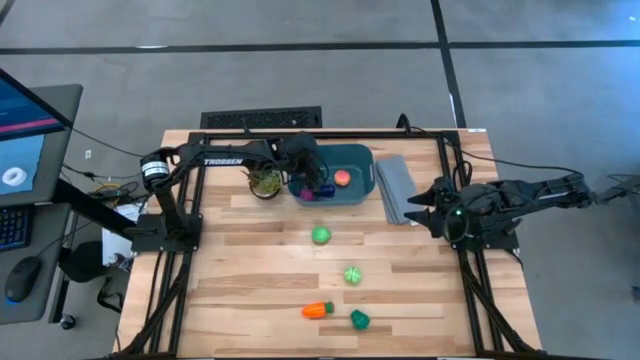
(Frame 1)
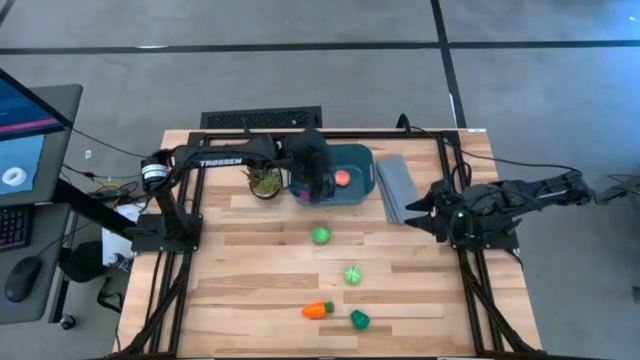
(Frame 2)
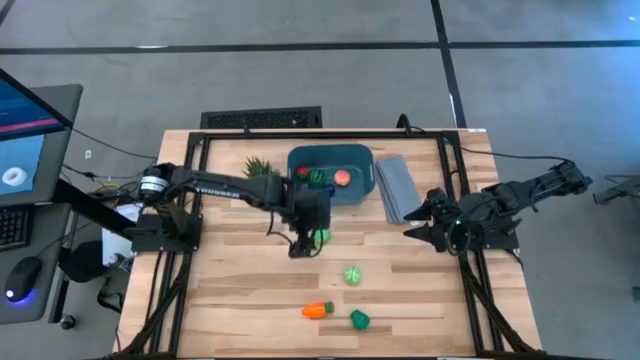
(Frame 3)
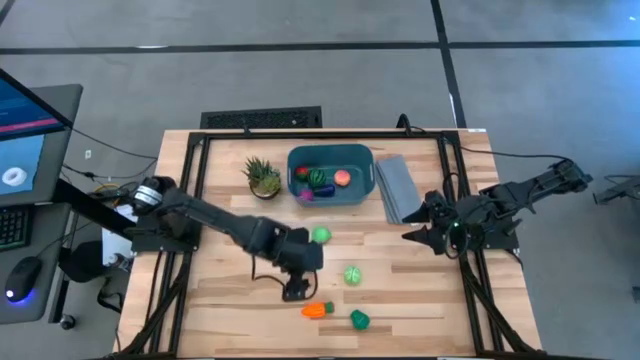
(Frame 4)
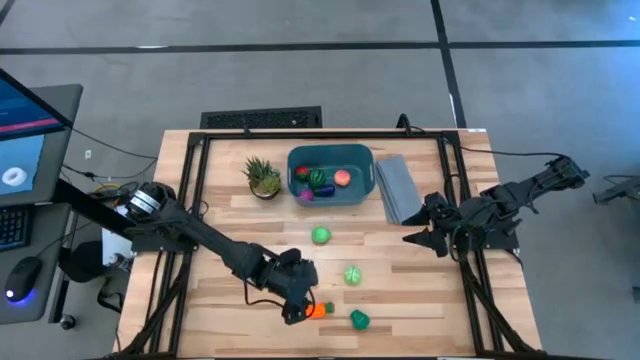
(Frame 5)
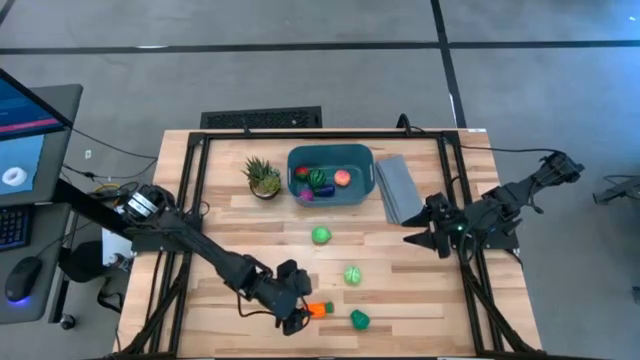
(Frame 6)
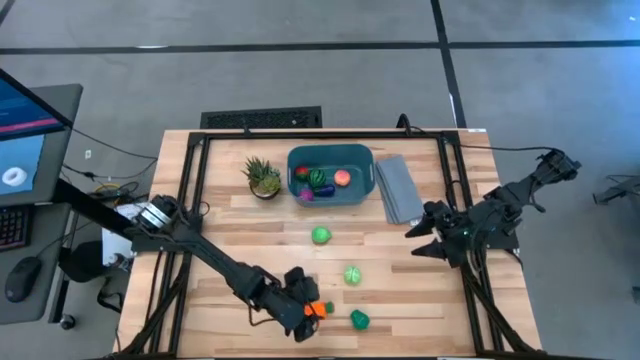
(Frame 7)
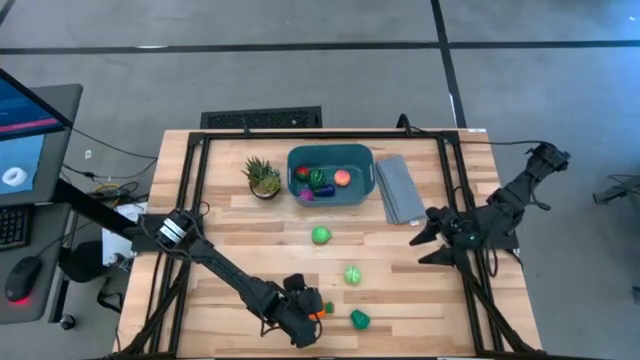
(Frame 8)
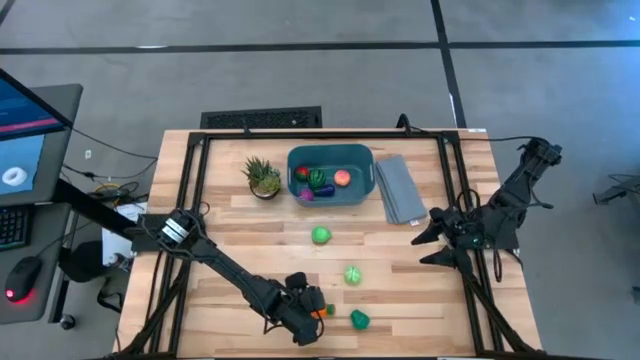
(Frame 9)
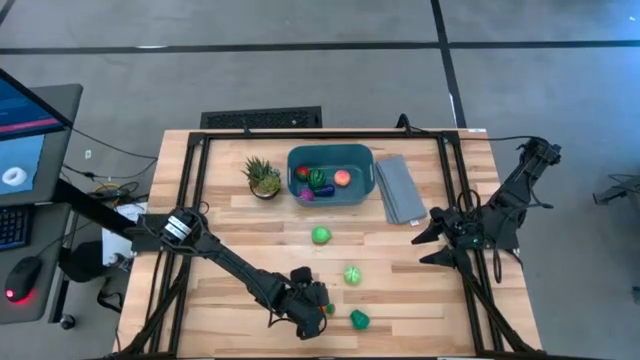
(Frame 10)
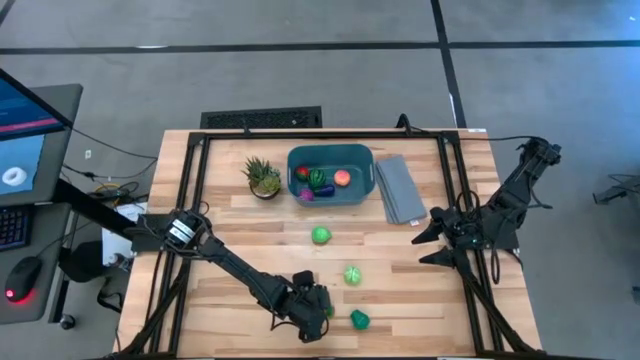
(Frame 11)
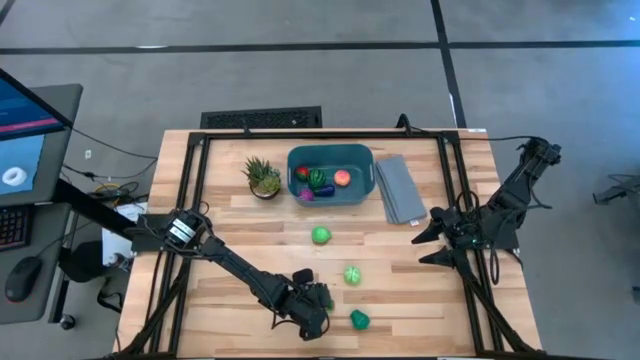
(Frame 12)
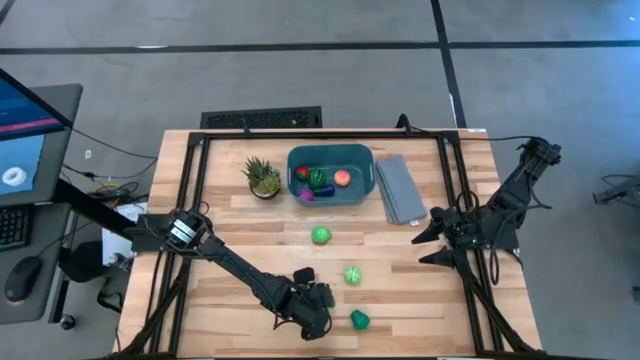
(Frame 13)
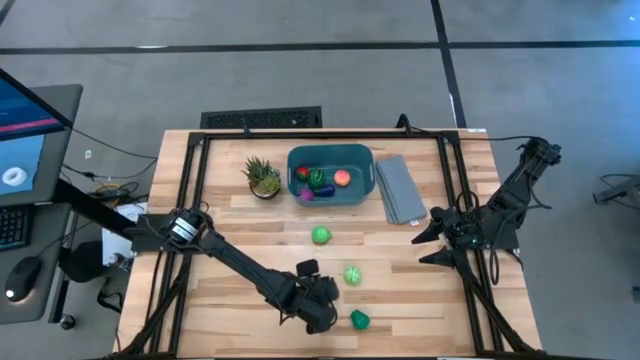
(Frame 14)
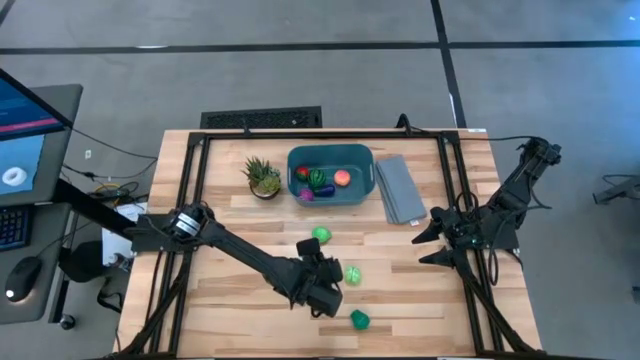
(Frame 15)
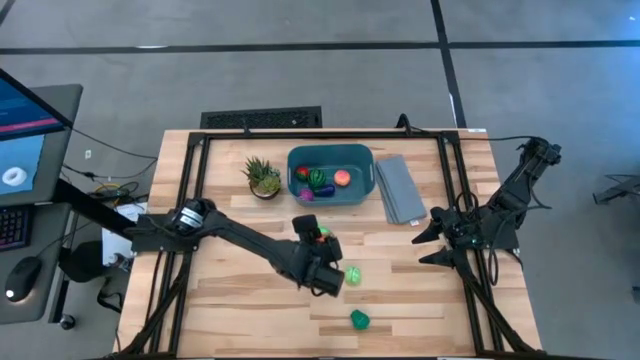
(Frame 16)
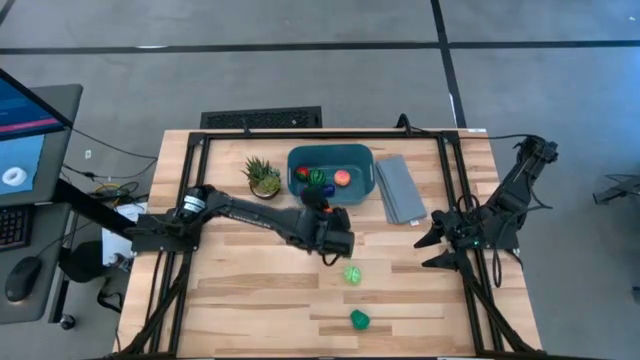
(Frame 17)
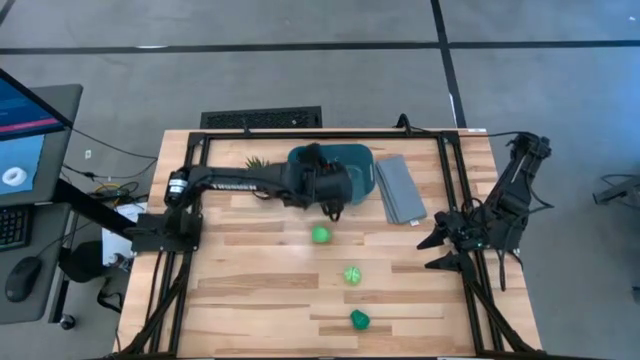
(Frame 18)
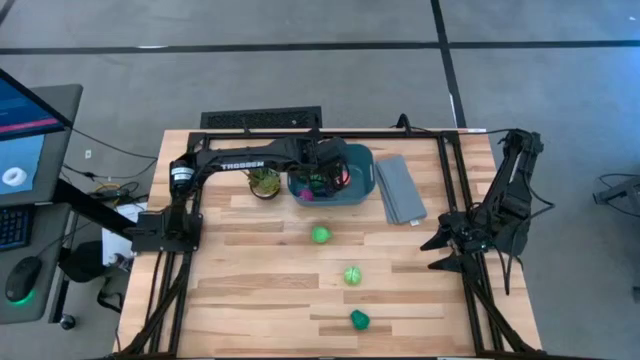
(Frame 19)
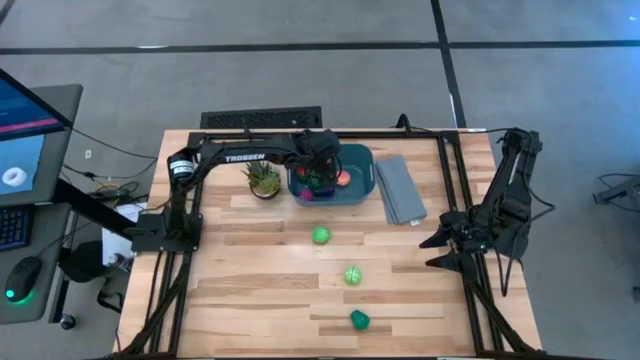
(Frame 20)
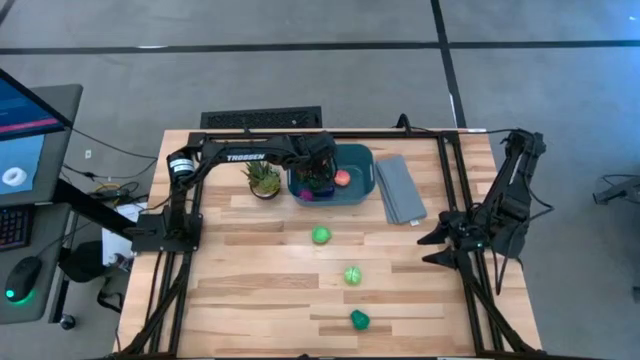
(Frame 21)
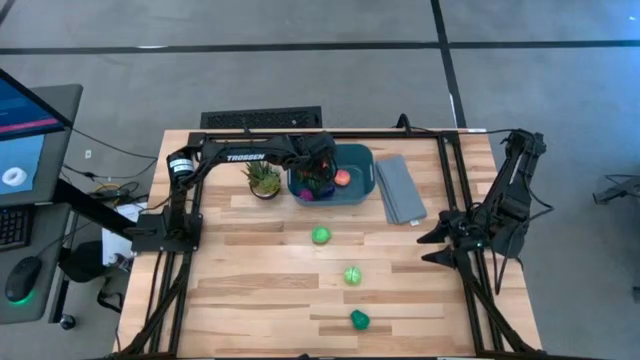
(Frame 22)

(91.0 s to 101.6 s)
Task: Pick and placing Produce into tupperware
Put the carrot into the blue bin

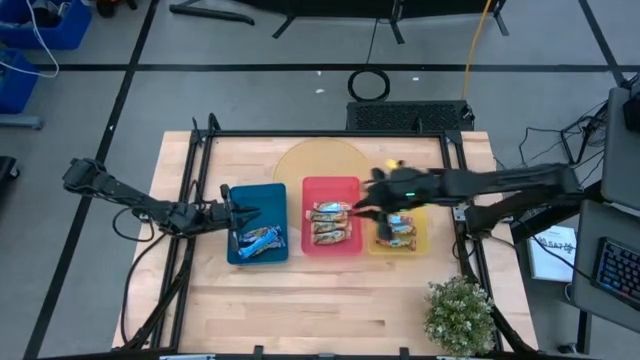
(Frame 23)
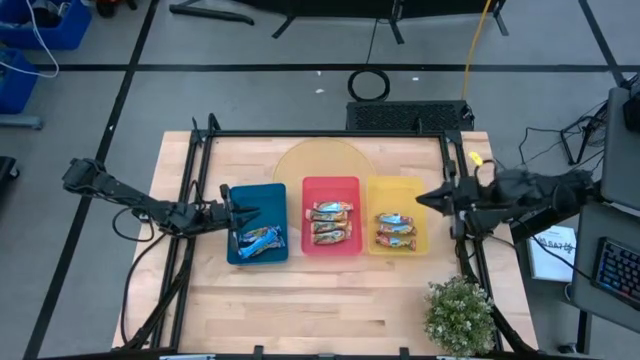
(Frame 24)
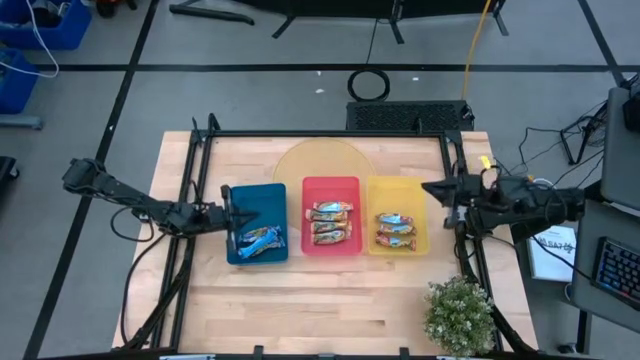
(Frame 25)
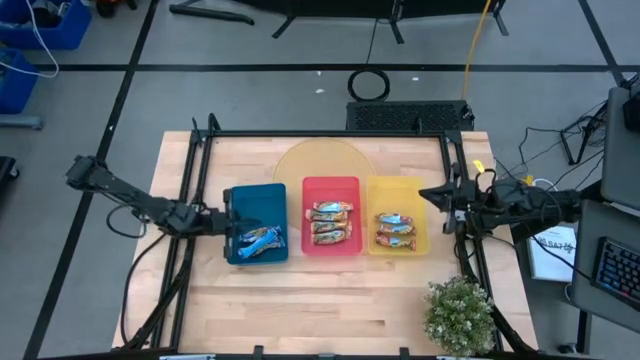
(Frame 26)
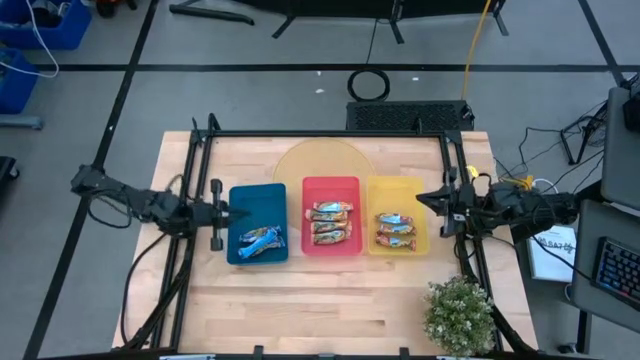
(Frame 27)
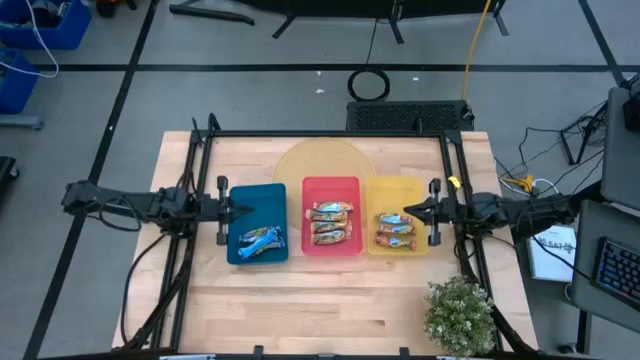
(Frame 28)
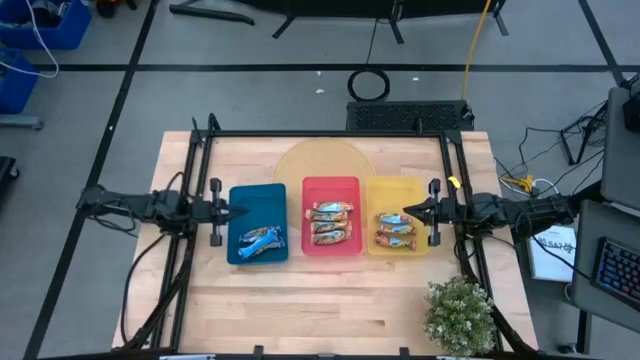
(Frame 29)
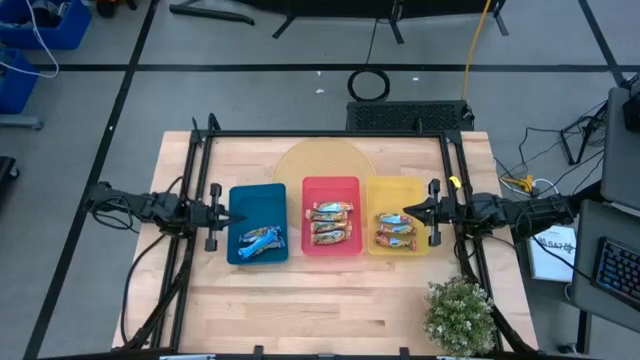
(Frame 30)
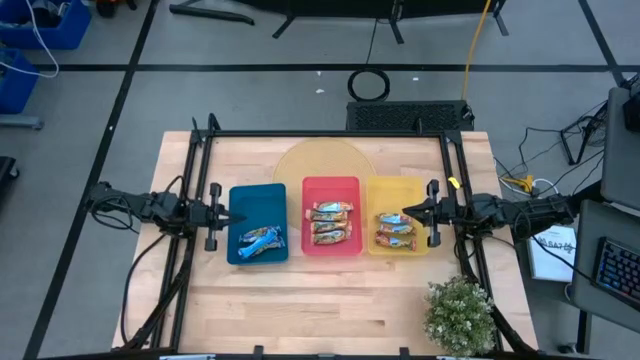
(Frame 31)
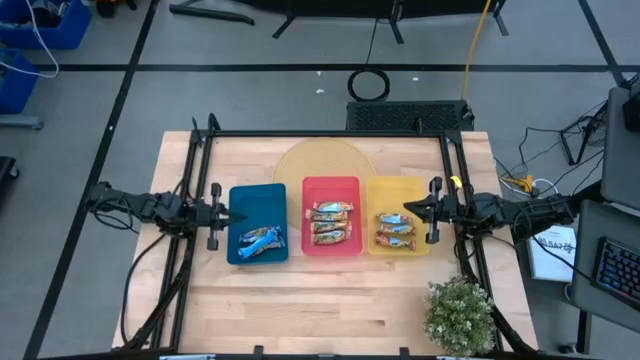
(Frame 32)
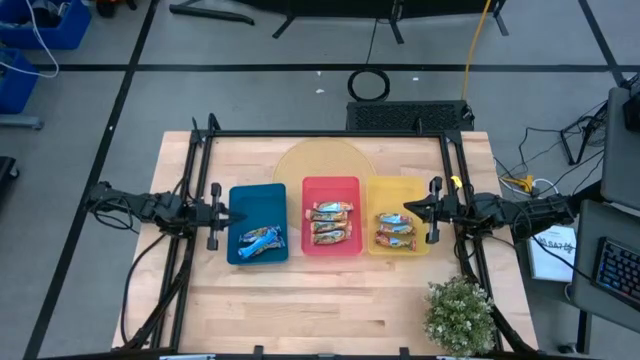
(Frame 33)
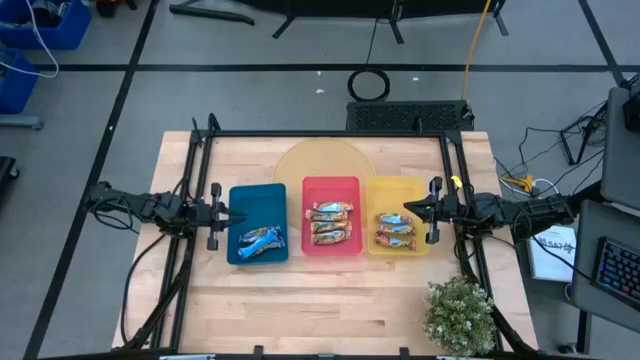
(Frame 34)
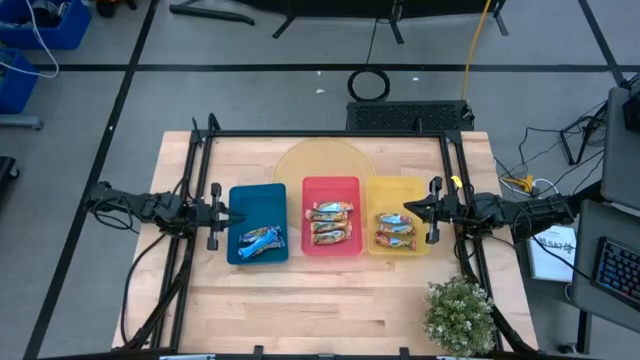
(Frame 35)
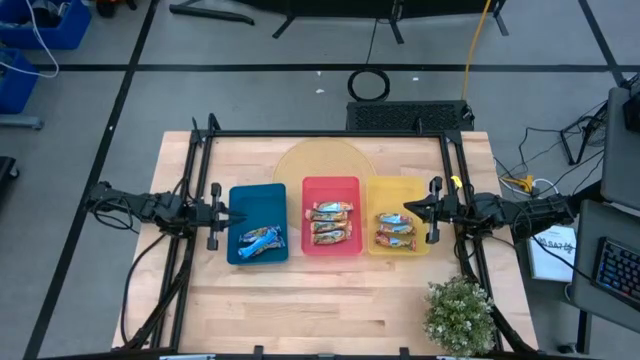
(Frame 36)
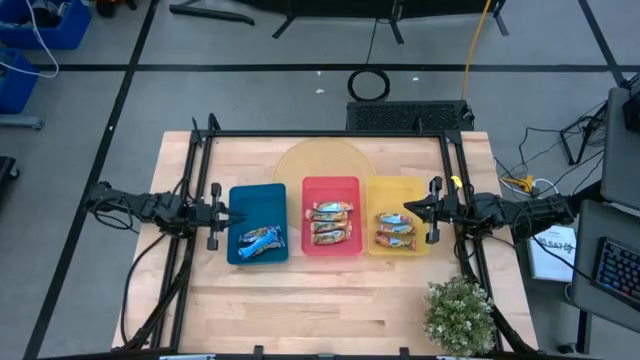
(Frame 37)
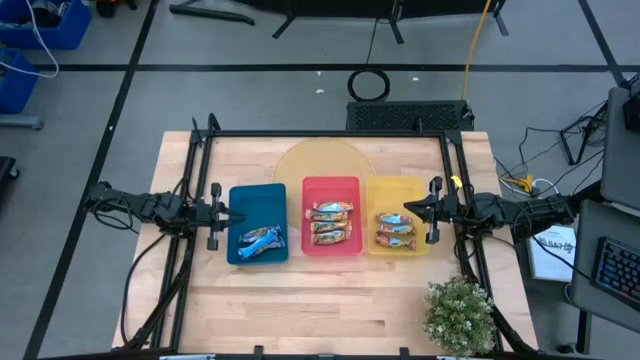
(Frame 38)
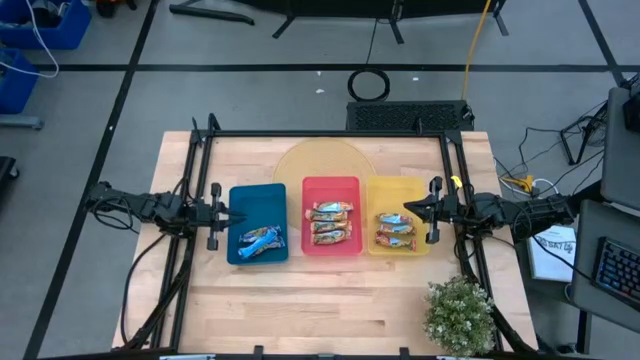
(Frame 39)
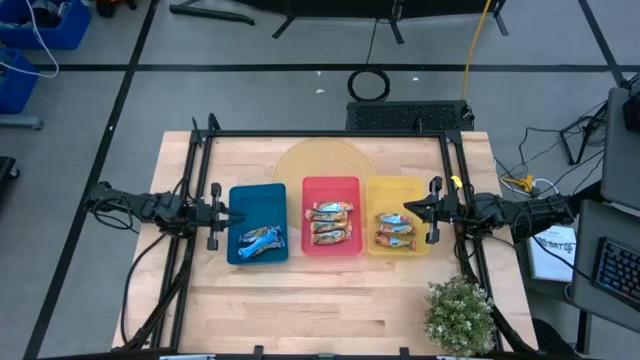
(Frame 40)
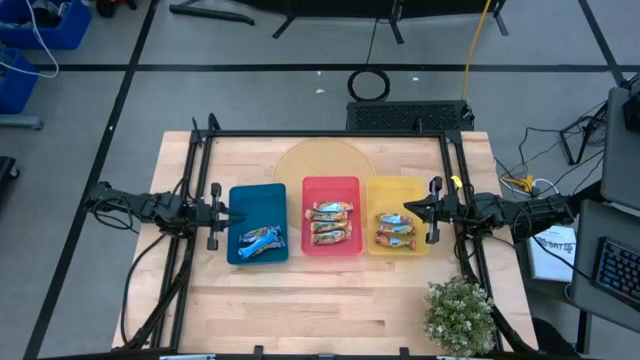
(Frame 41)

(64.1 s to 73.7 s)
Task: Pick and place Granola Bars by type
Return to Home Position
